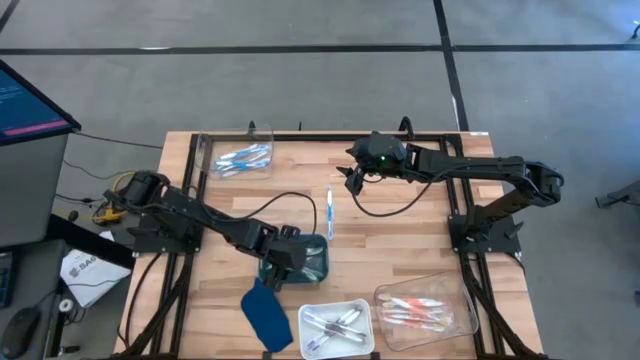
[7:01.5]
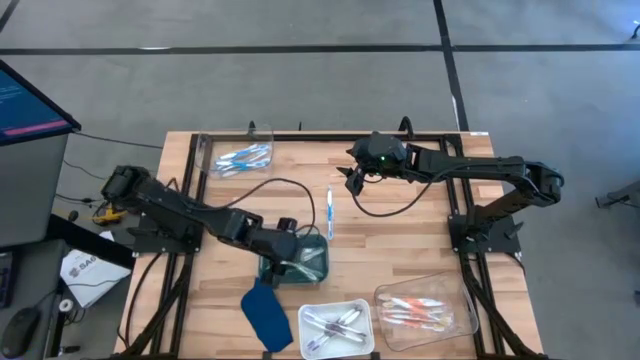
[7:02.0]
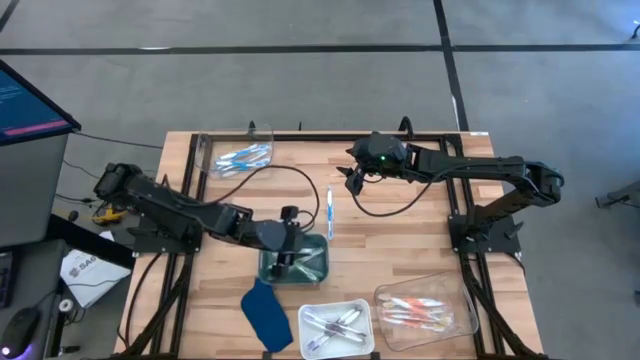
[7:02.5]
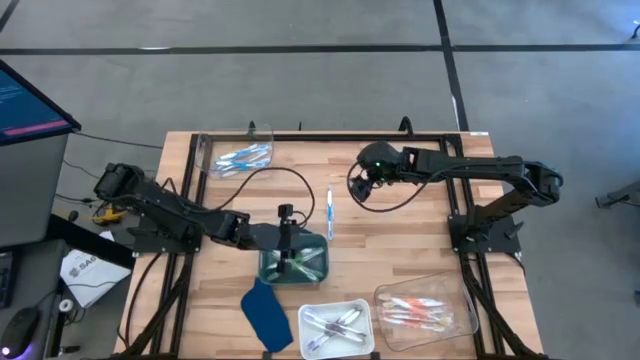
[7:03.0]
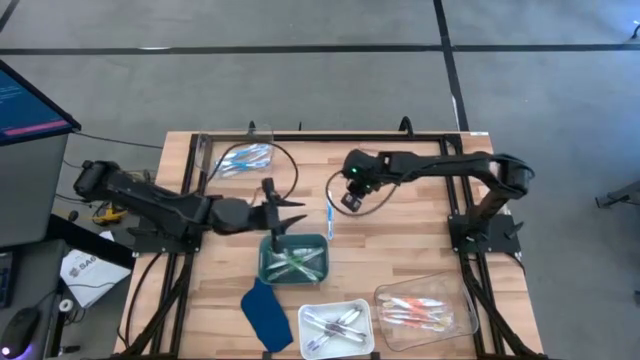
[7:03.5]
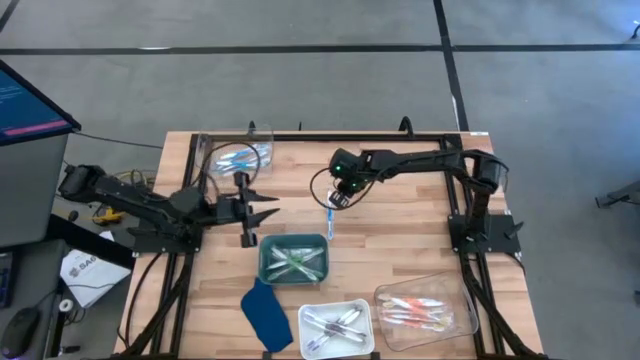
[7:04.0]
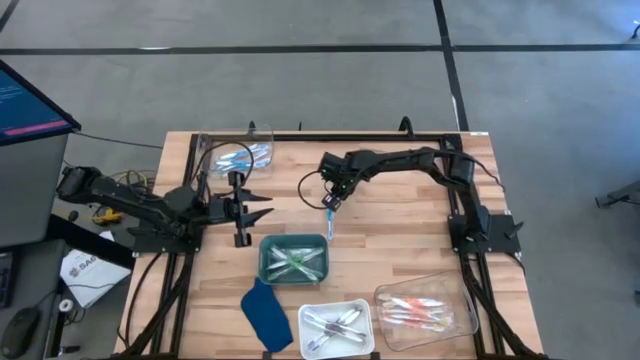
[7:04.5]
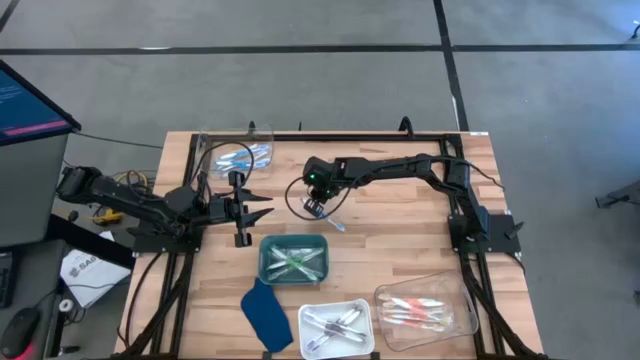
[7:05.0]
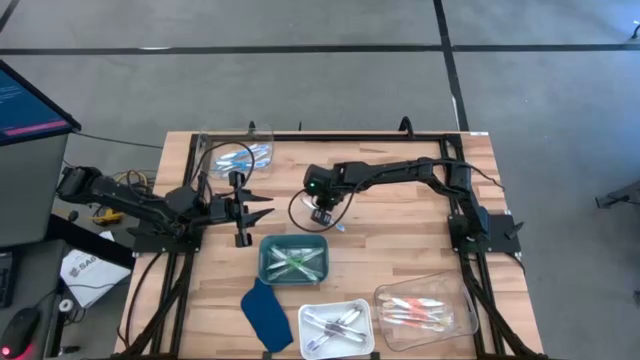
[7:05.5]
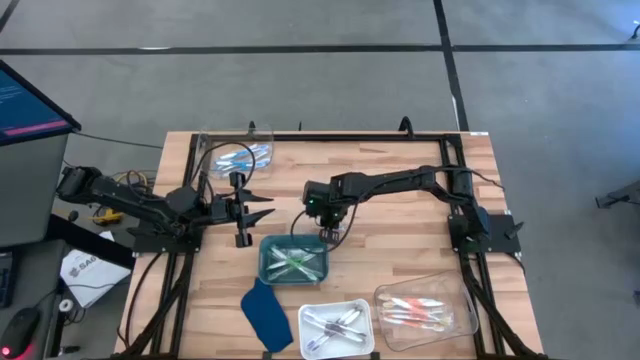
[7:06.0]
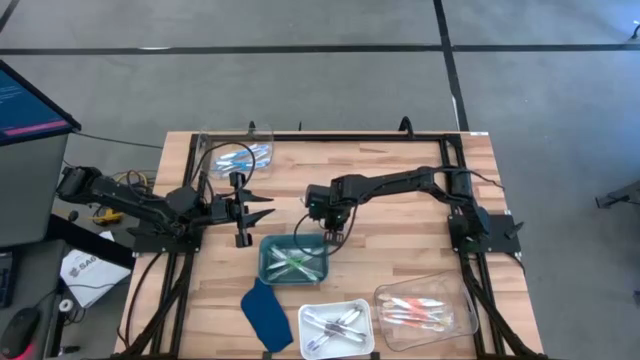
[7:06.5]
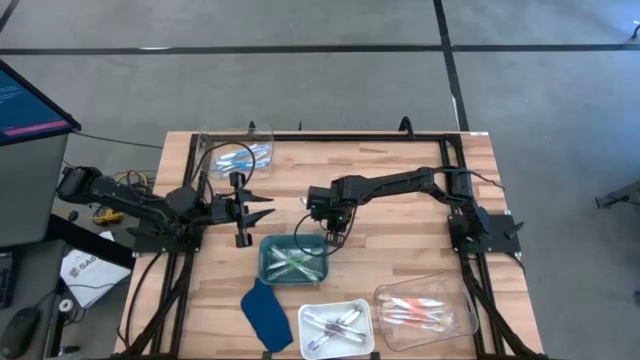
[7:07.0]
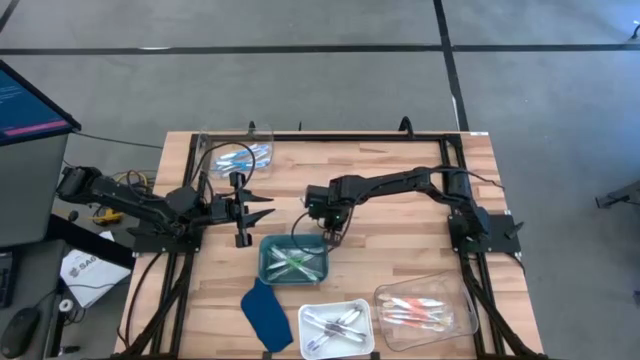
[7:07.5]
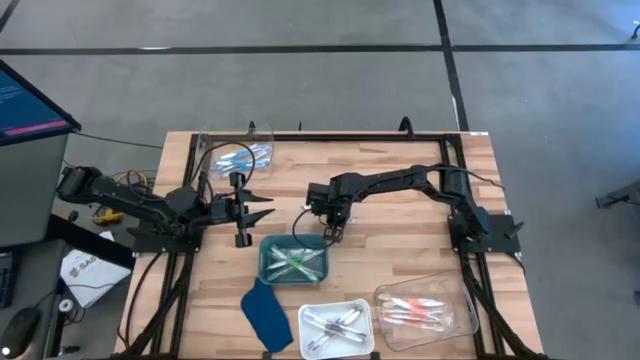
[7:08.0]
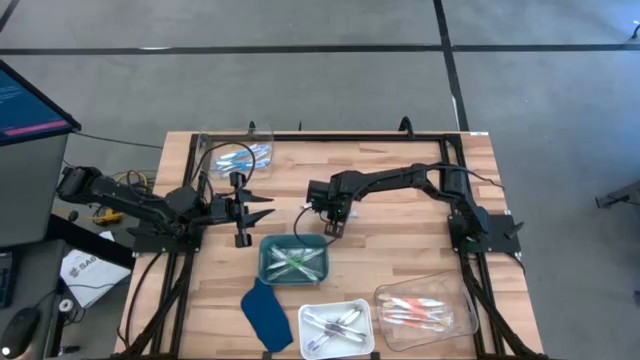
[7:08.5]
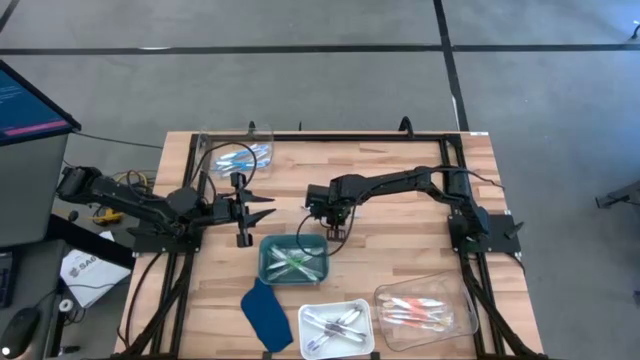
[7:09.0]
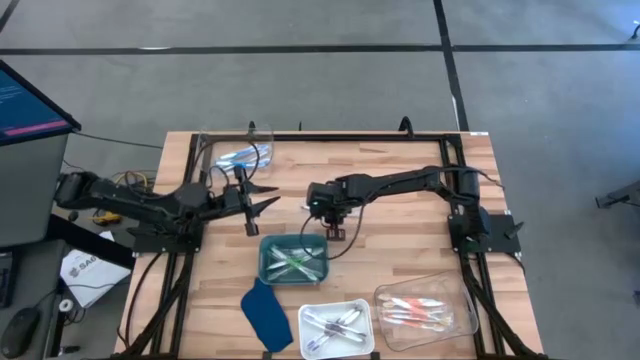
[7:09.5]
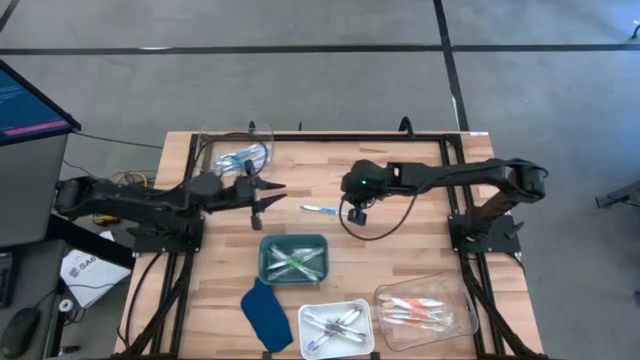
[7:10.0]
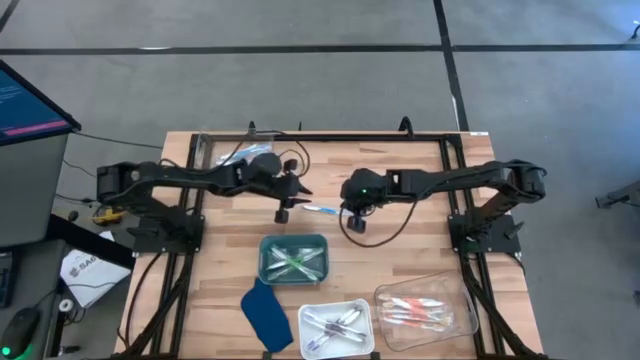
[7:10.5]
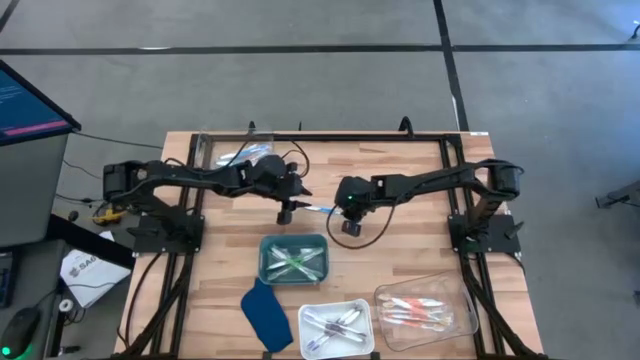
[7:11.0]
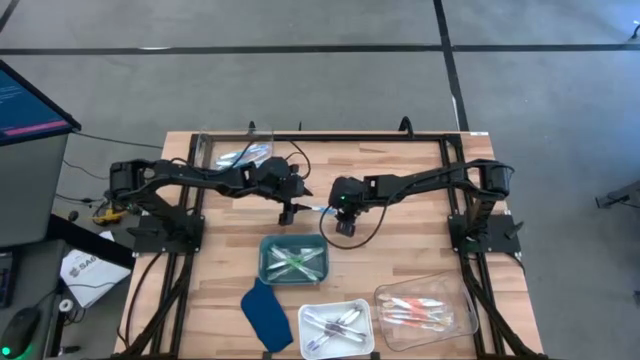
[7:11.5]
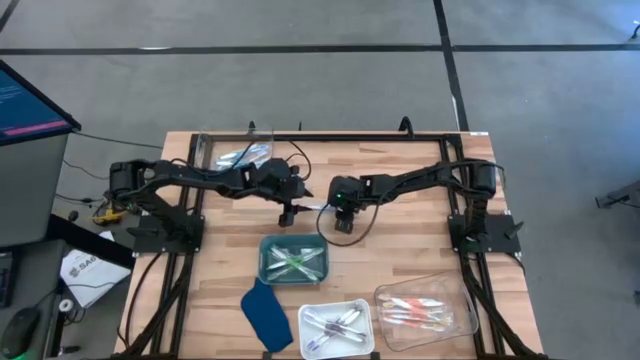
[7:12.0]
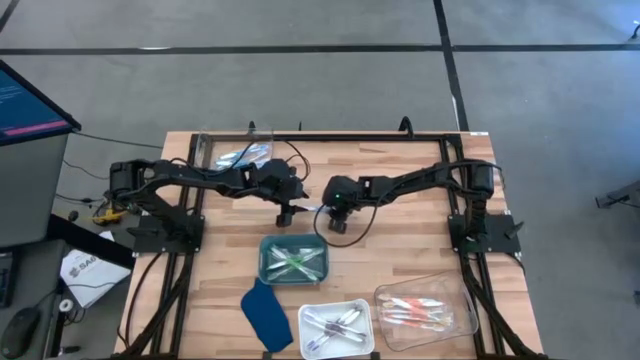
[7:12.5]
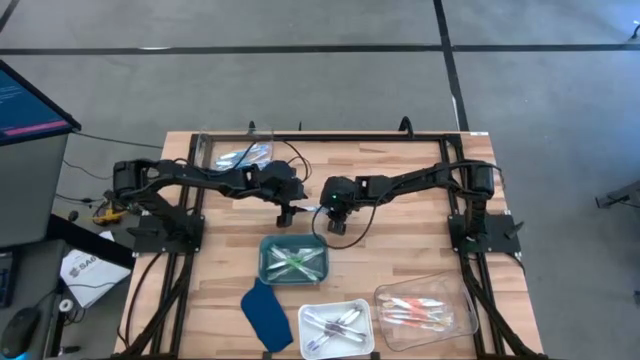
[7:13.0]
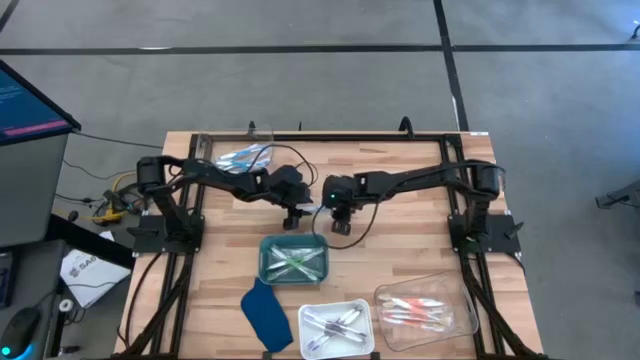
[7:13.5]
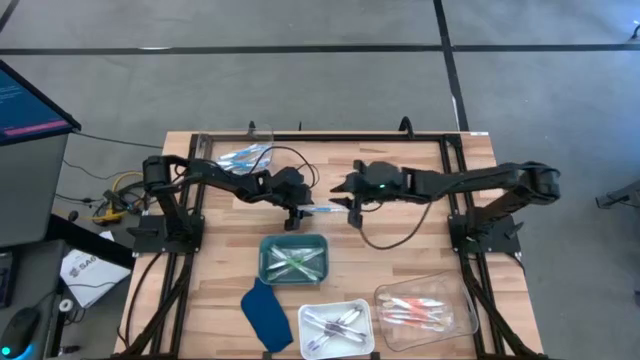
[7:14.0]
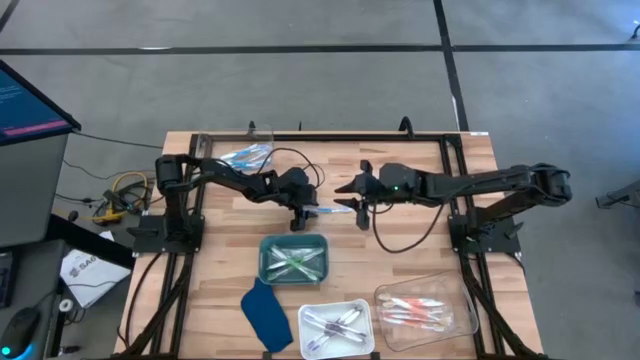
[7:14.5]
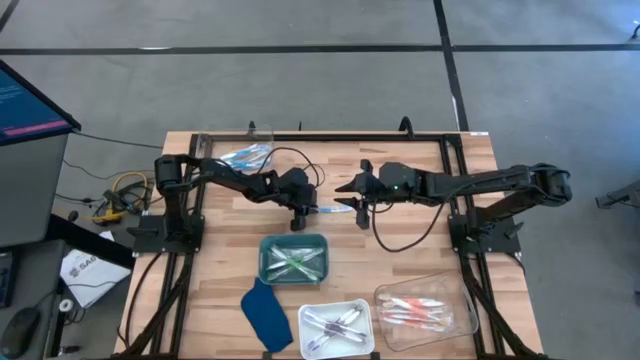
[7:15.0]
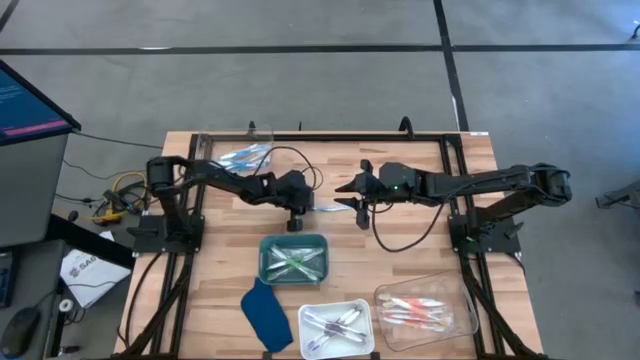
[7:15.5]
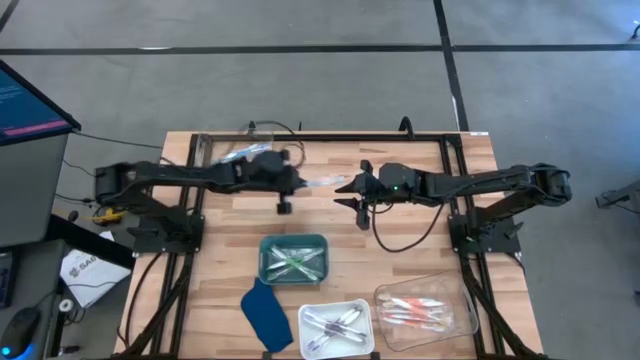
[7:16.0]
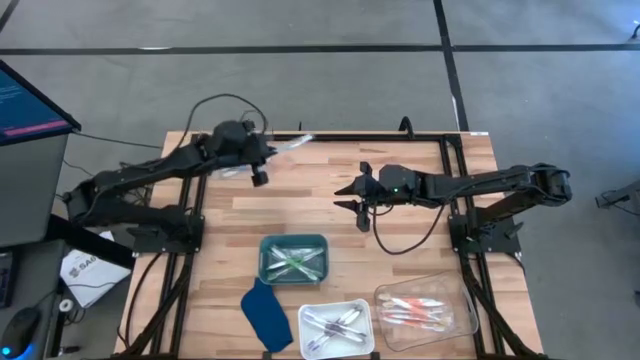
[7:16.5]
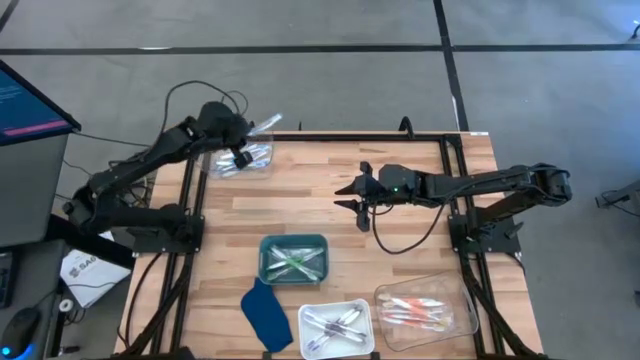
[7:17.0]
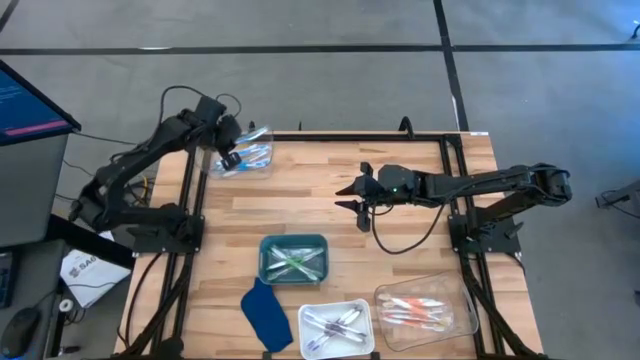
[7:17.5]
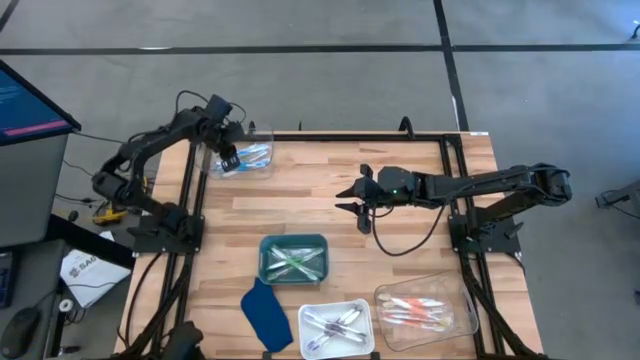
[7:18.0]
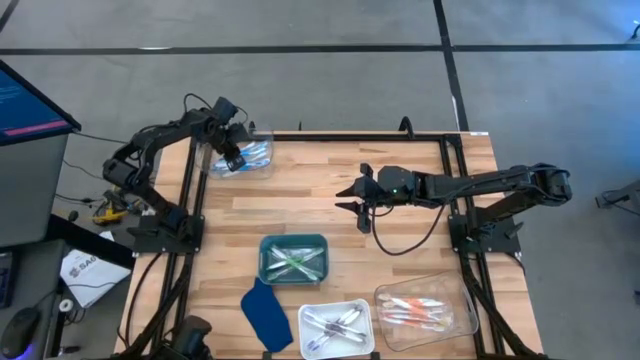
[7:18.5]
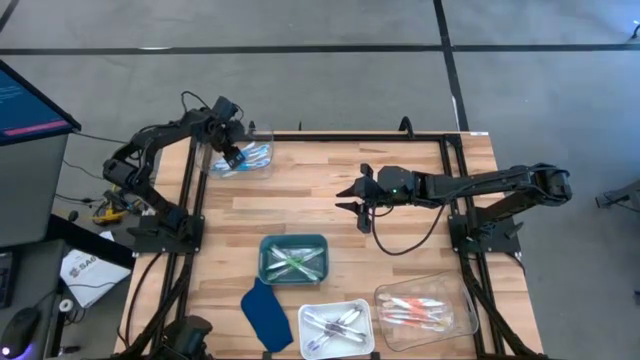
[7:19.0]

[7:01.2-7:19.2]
Task: Pick & Place Toothbrushes
Put the blue toothbrush into the top transparent bin

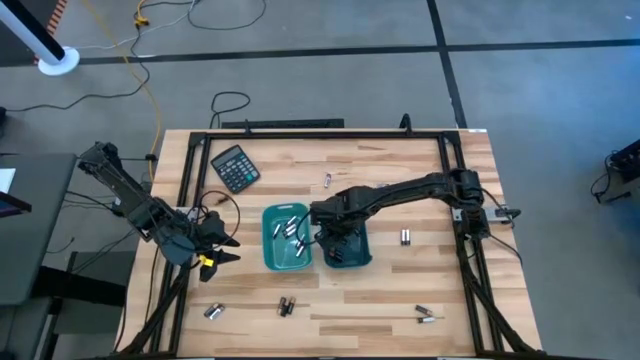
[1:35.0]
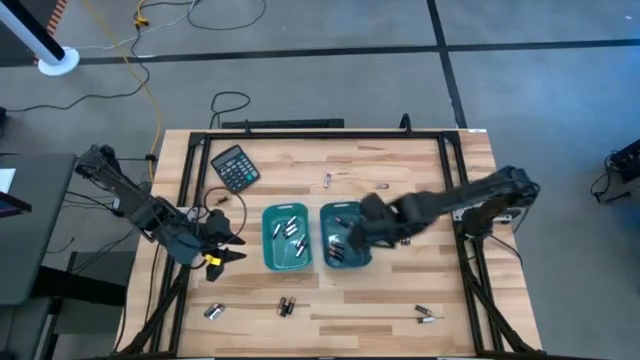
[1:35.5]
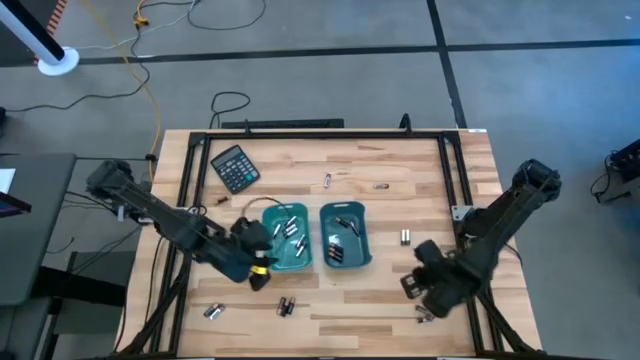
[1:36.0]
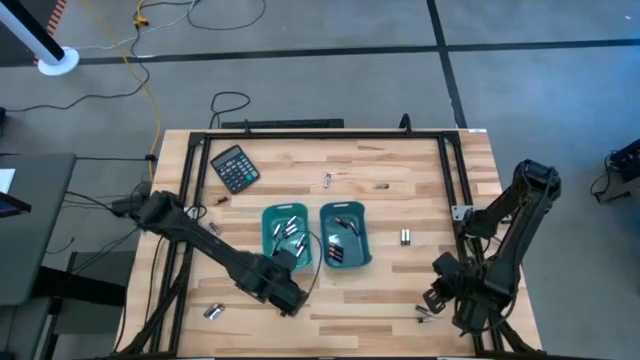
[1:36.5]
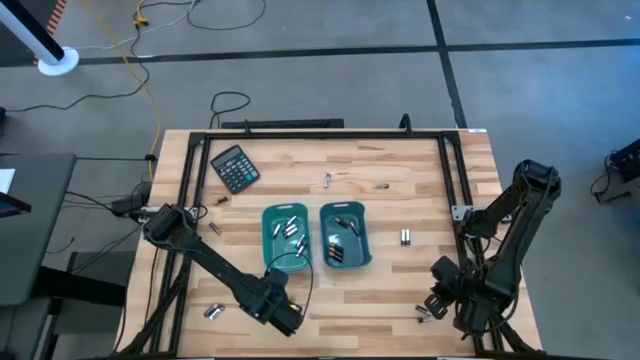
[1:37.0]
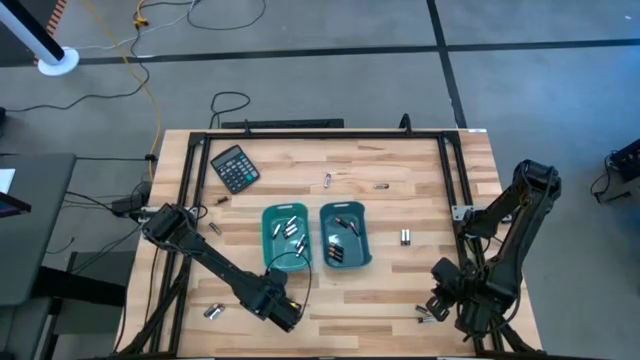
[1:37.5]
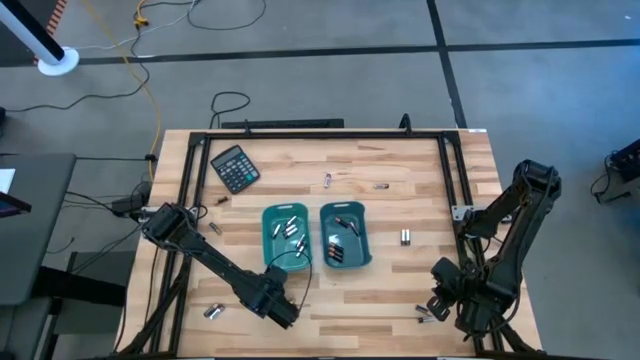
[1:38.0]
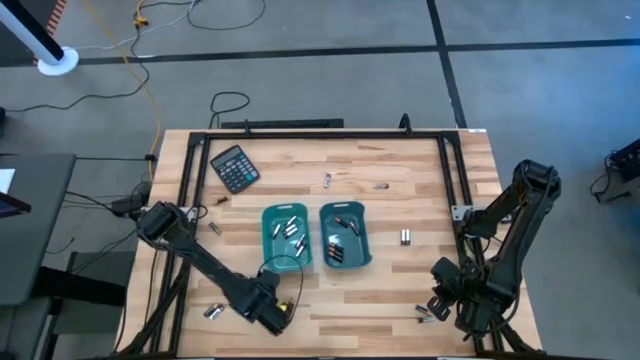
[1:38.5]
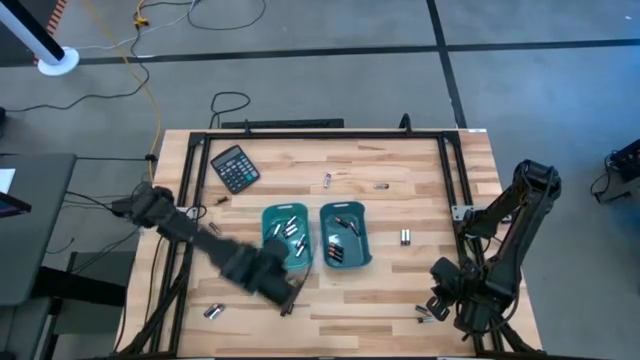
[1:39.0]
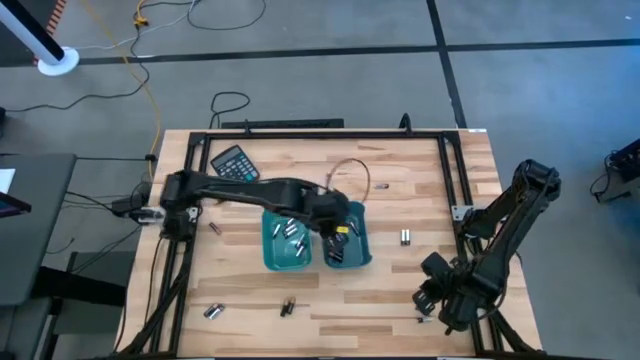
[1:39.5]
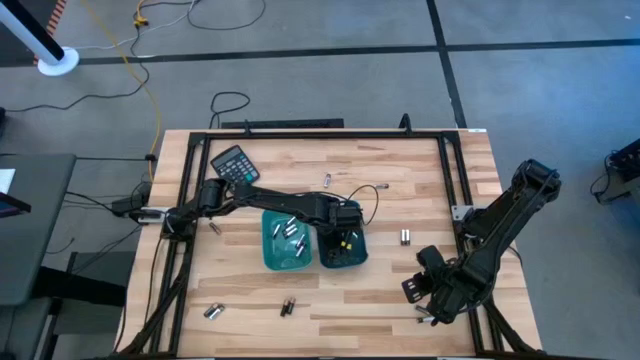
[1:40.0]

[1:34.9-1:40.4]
Task: Sort batteries
Put the black battery into the blue bin
